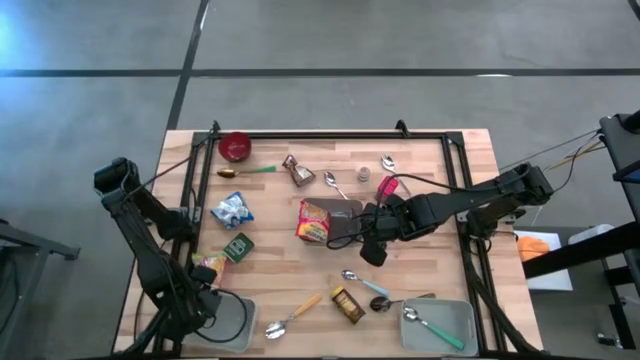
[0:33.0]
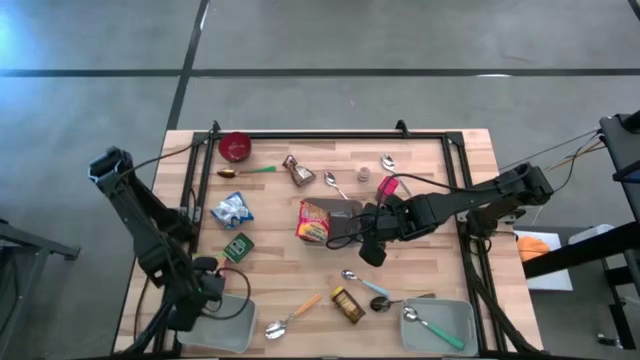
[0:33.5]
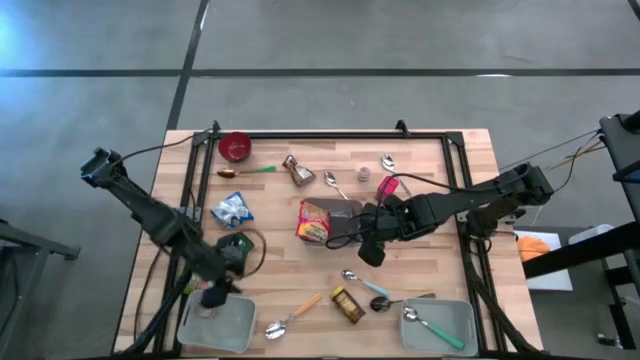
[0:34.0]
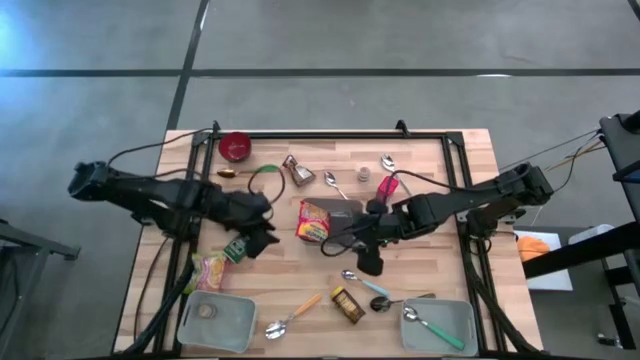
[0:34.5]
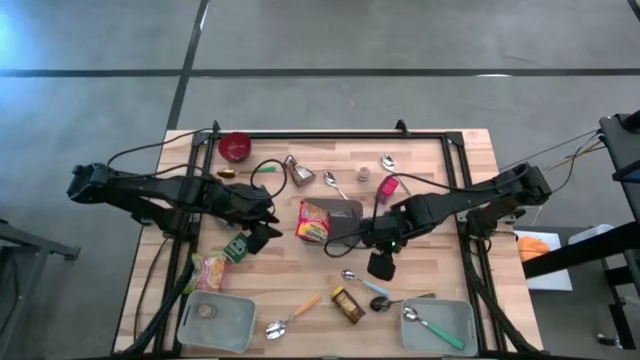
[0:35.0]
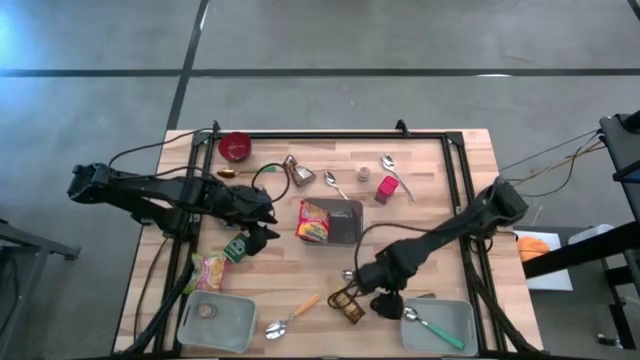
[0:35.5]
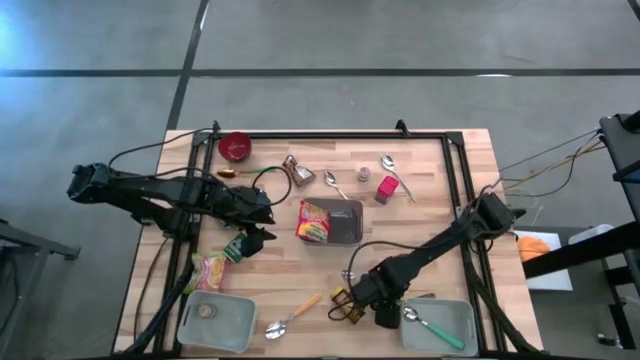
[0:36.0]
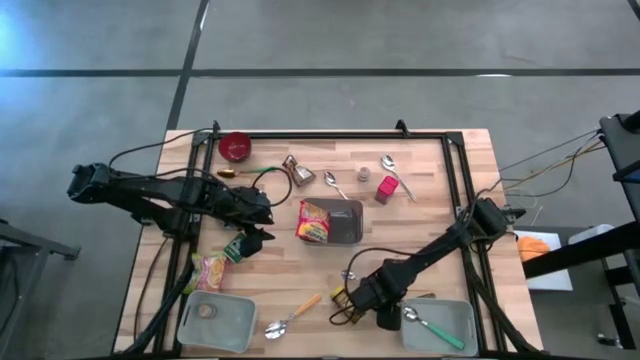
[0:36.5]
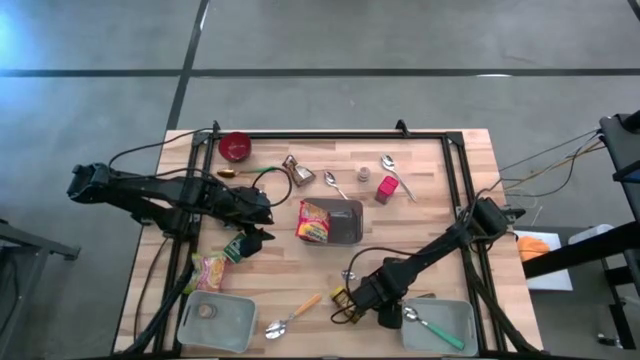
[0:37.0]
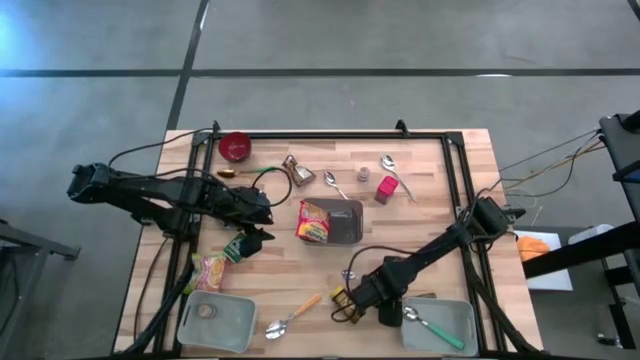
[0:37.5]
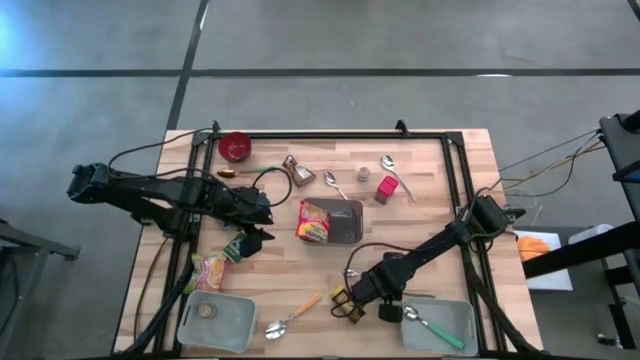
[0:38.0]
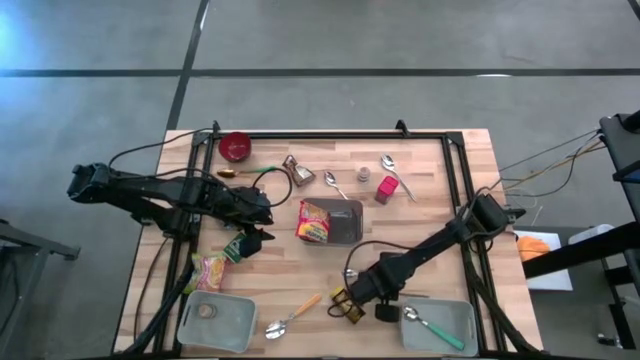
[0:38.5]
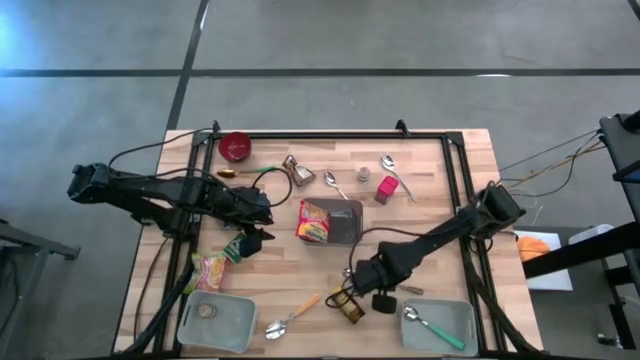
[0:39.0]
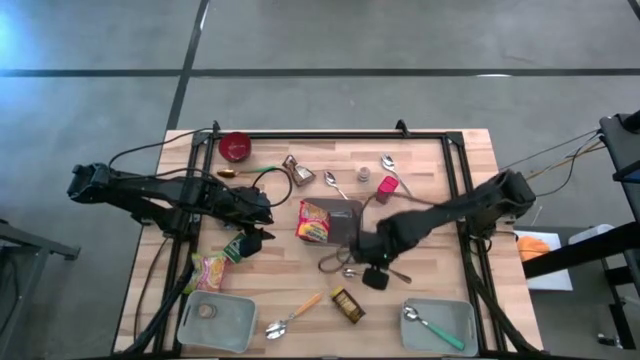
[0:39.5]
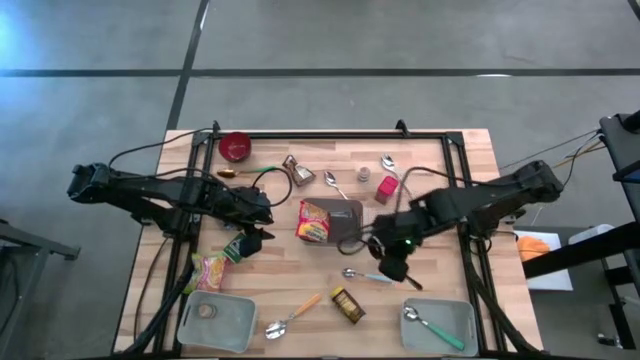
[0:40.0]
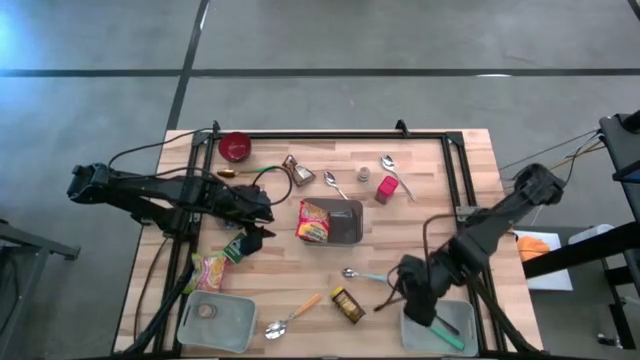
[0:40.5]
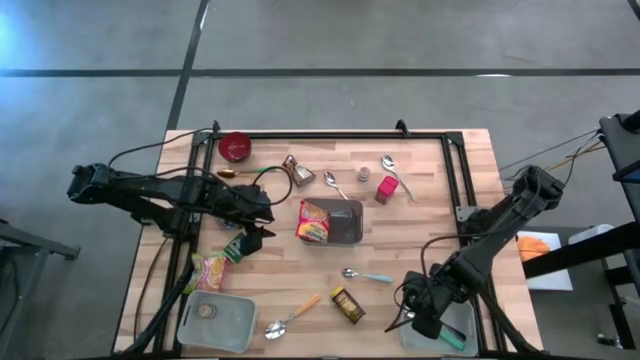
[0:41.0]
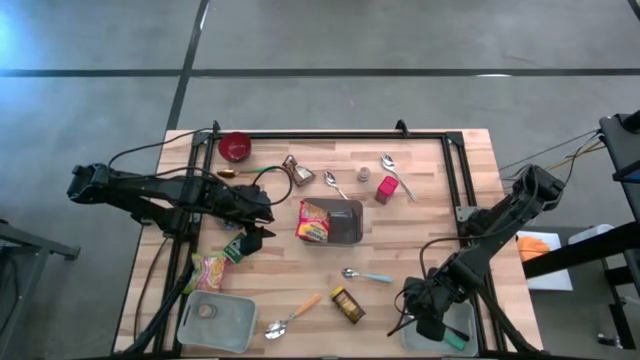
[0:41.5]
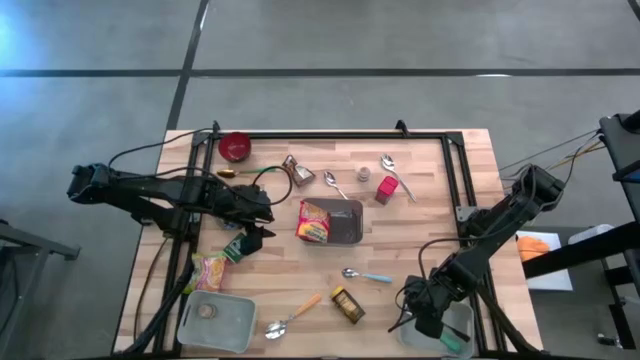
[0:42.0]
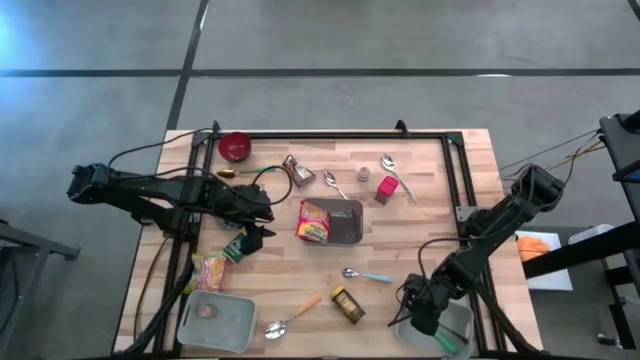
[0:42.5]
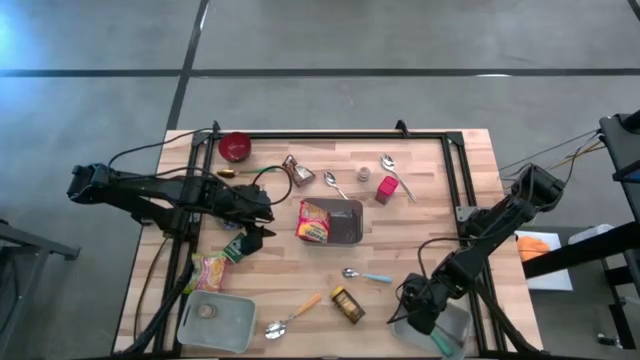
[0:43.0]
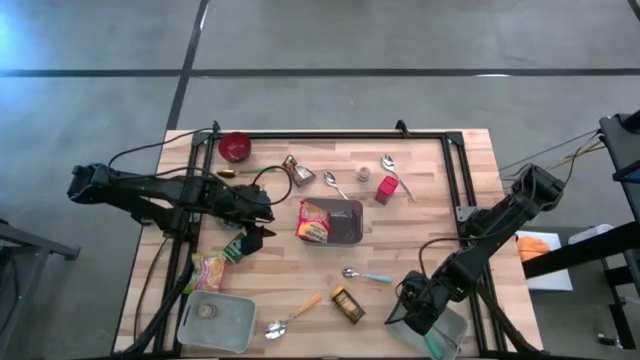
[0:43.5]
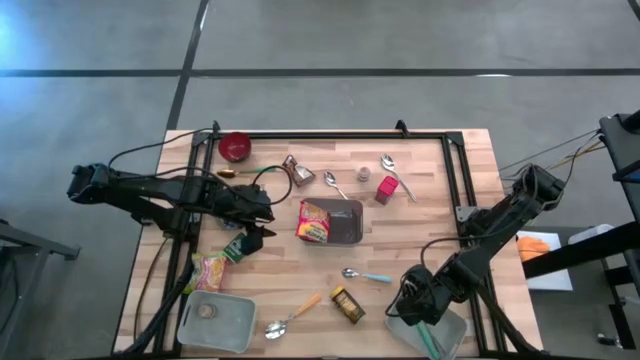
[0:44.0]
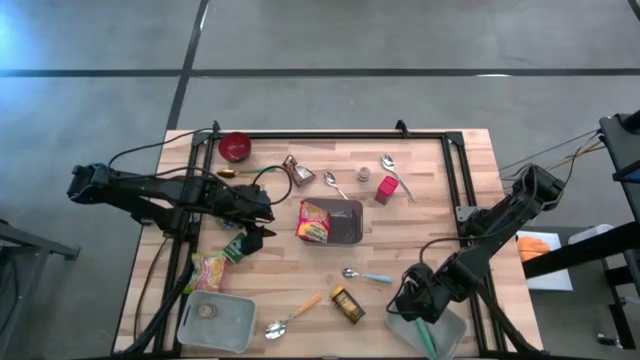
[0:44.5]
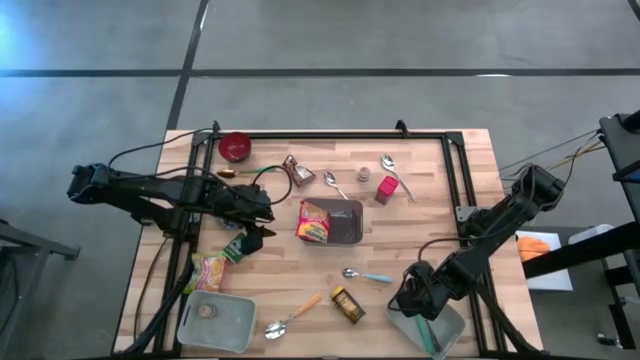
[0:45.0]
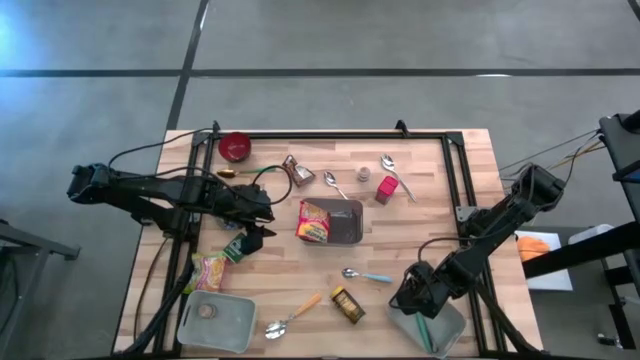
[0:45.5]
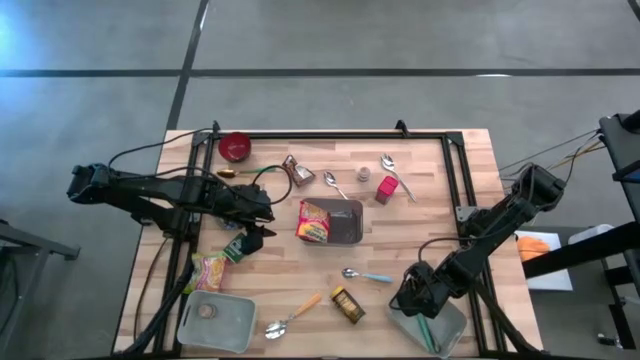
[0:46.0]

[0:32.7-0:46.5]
Put the black spoon into the right grey bin

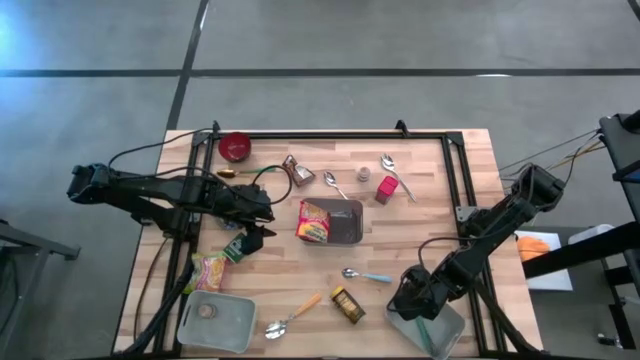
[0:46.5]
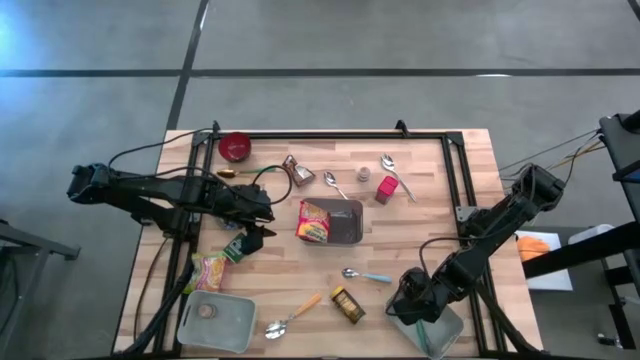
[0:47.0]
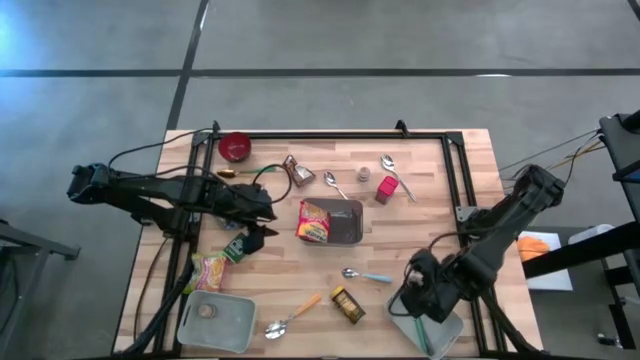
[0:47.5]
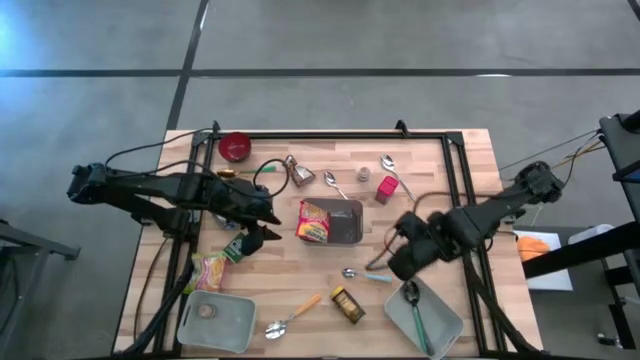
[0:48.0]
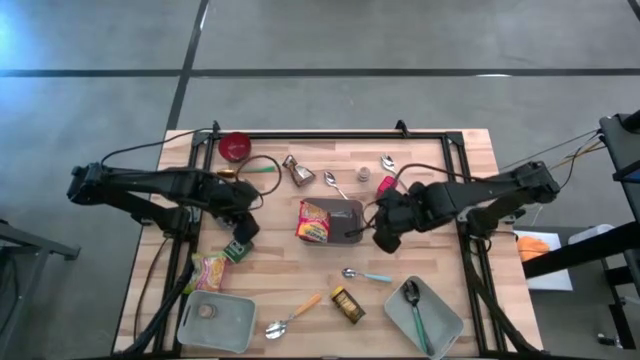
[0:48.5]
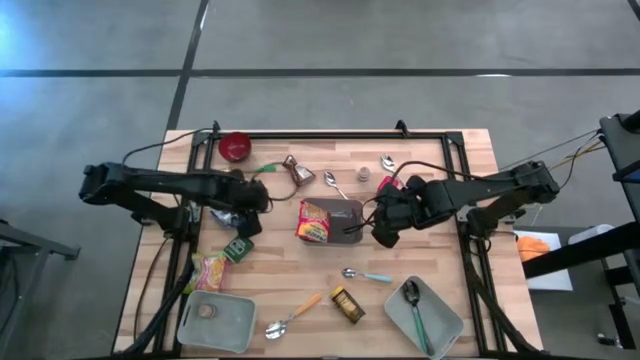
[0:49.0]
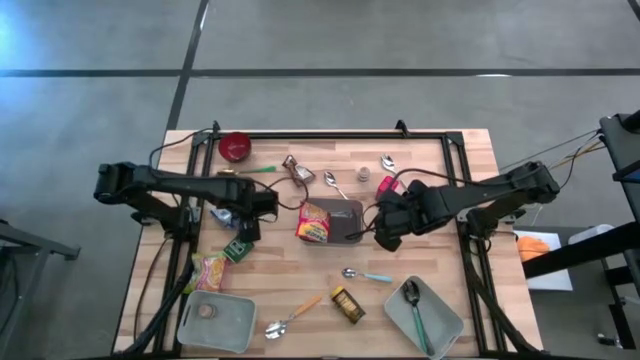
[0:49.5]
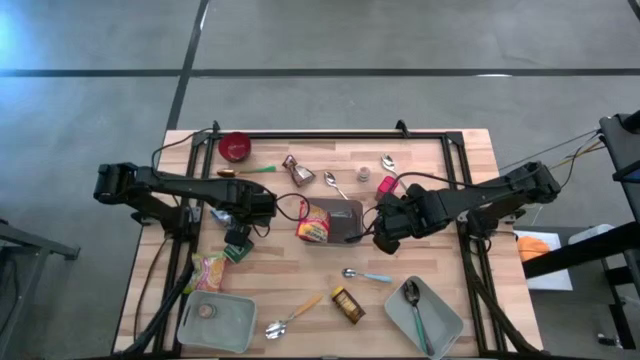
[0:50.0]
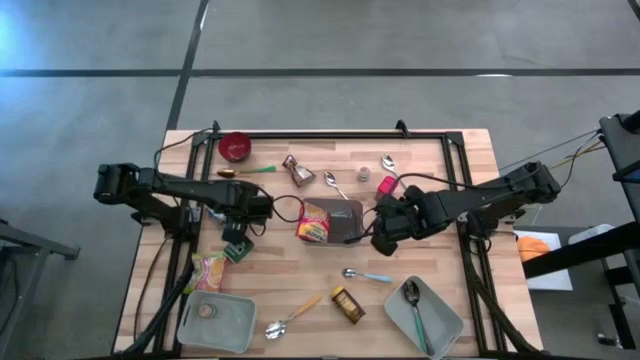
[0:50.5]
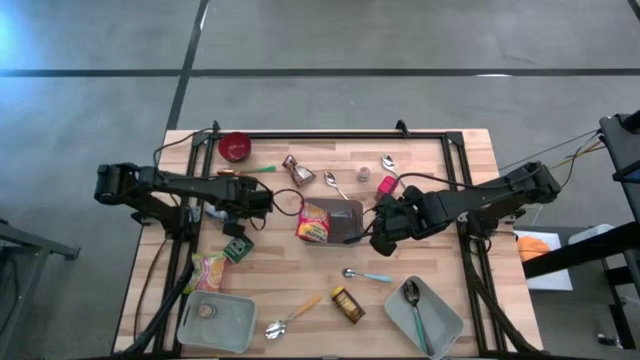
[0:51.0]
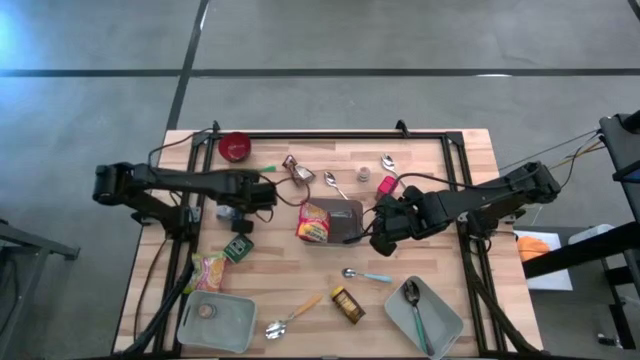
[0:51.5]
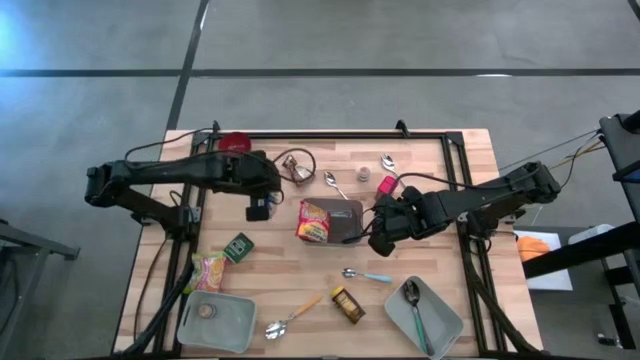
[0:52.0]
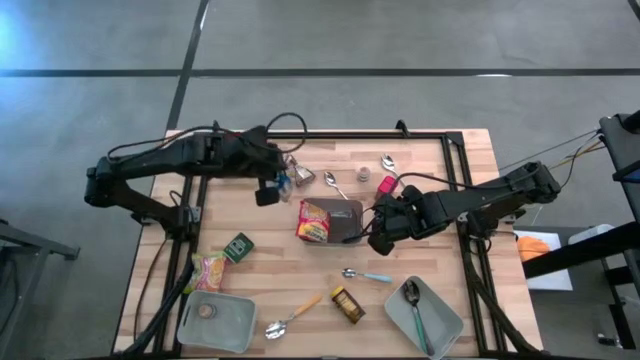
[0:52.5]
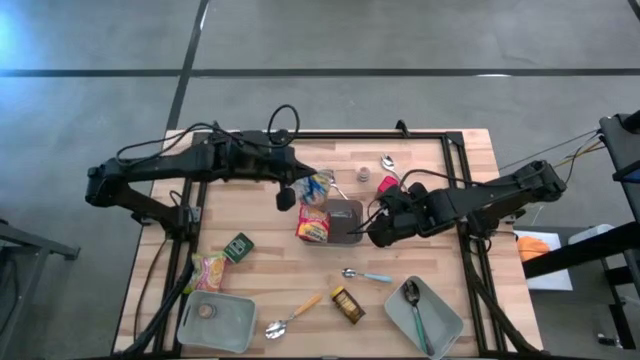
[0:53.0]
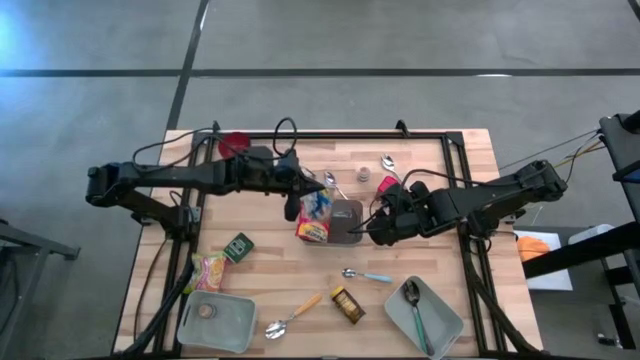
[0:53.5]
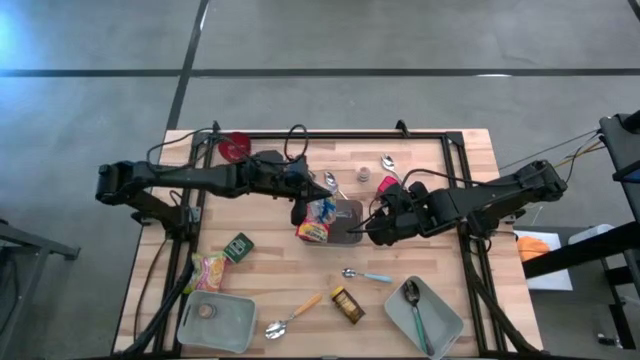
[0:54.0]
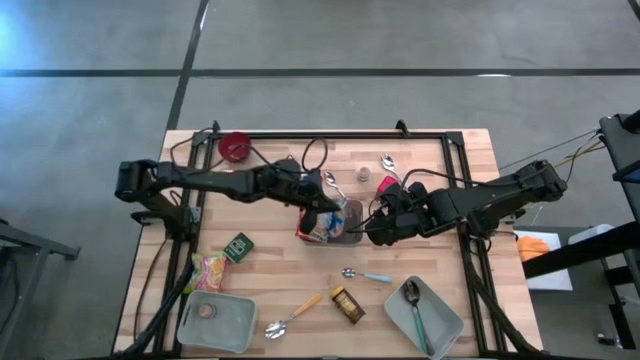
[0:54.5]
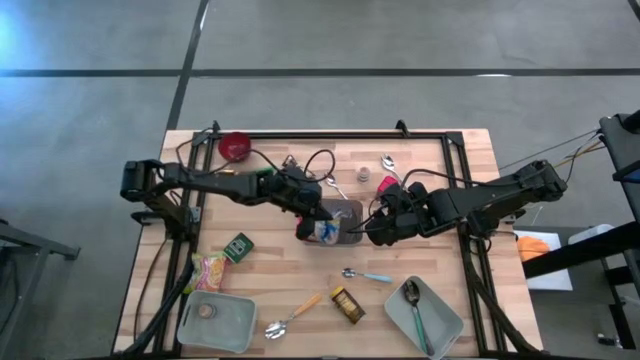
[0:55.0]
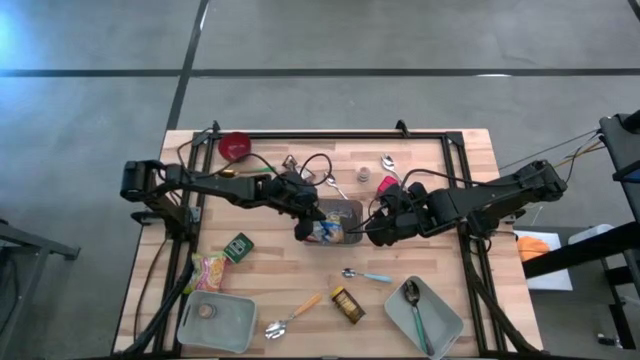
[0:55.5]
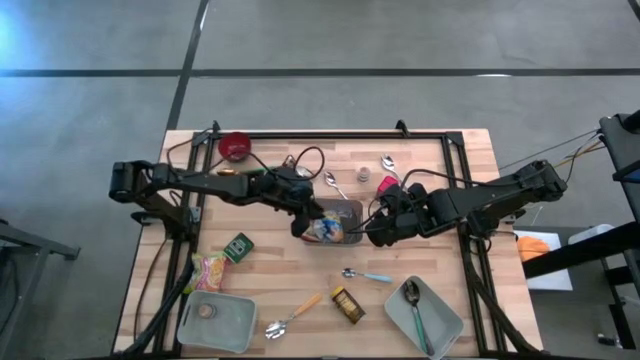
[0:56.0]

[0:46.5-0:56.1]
Put the blue noodle pack into the black bin
